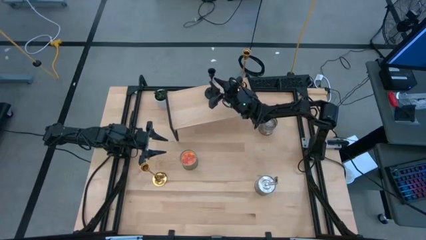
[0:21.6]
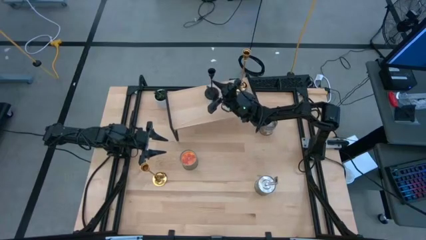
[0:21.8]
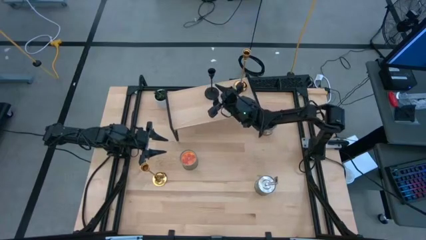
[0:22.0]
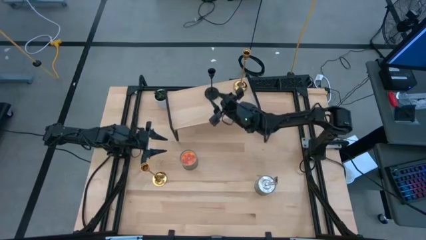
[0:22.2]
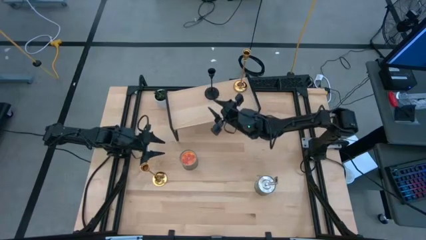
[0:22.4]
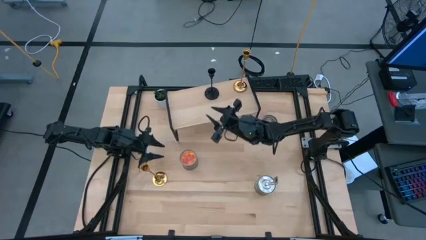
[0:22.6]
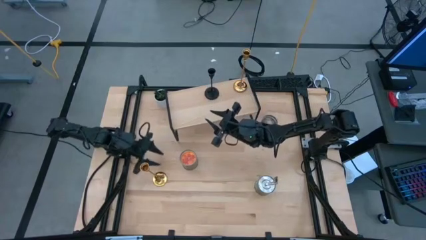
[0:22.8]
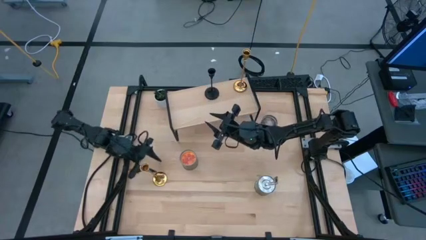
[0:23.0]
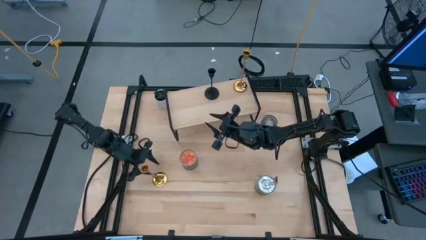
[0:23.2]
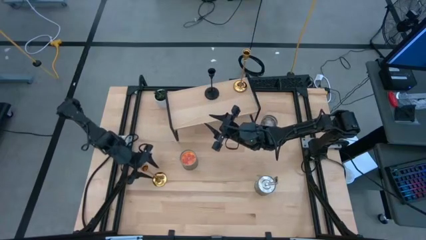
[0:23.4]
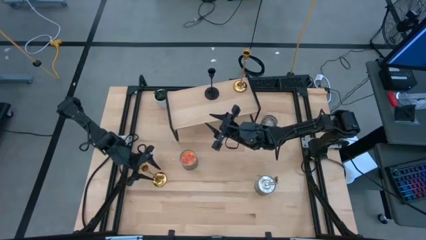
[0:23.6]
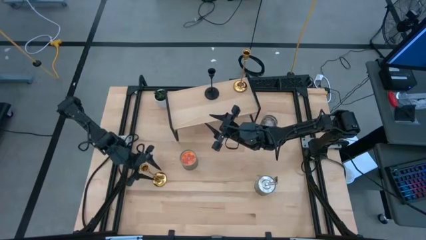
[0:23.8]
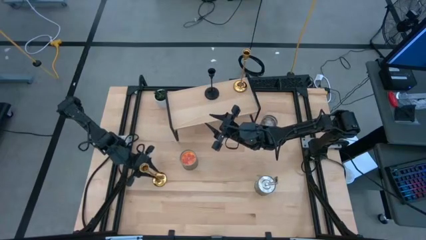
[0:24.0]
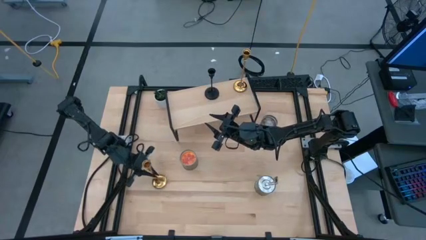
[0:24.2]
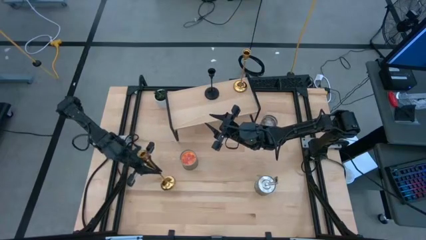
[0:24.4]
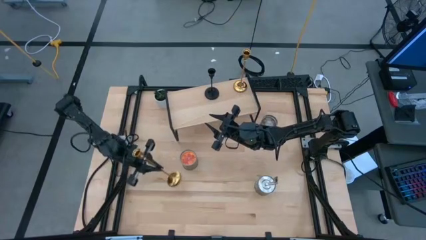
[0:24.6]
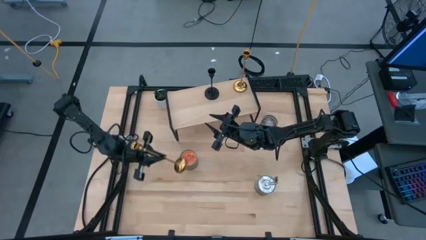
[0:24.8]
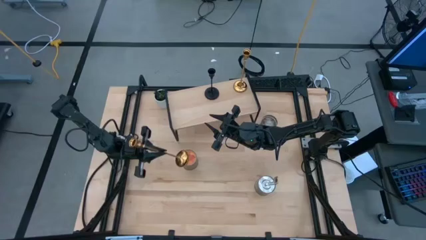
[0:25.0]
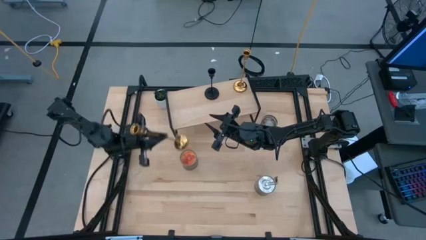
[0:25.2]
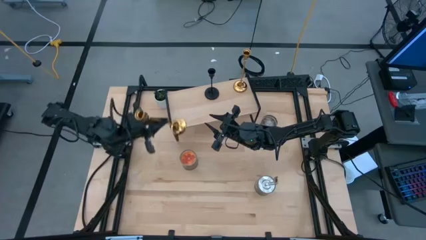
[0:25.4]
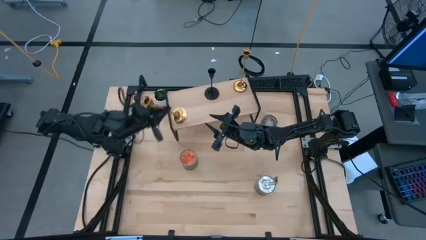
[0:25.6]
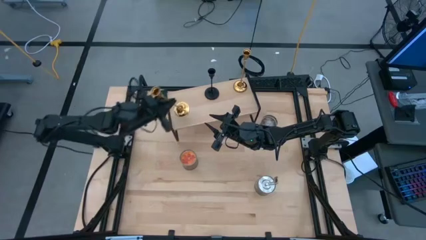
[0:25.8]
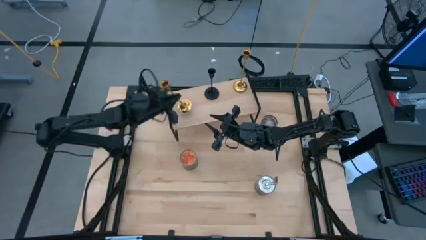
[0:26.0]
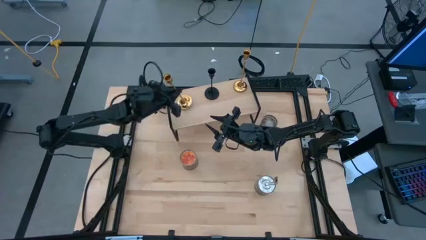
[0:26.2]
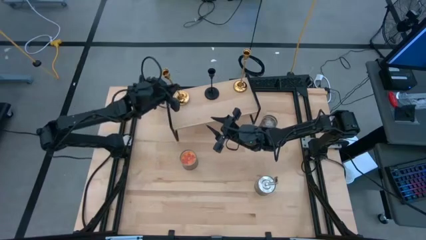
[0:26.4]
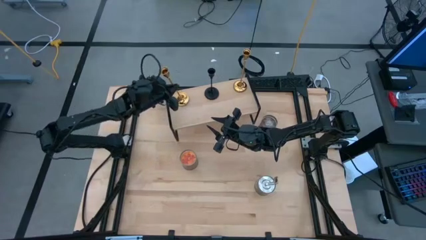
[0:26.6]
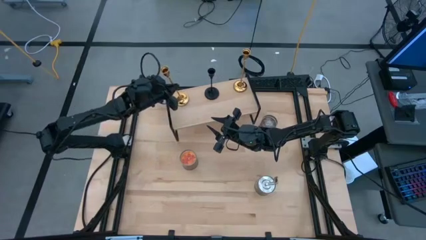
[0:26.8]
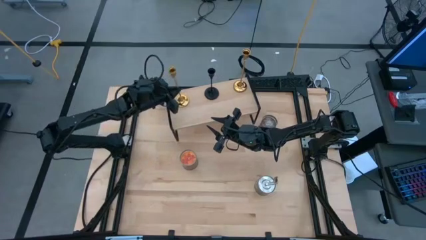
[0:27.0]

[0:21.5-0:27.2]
Task: Pick & Place candle stick holders
Put the gold candle holder on the shelf

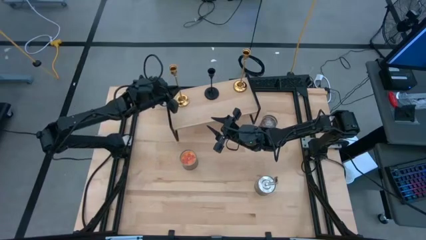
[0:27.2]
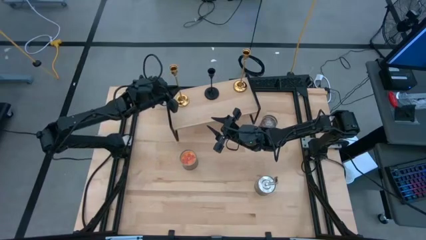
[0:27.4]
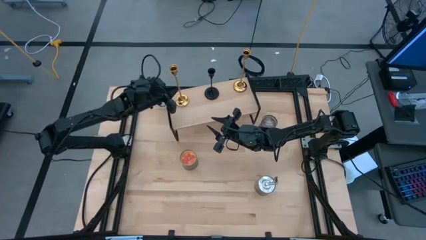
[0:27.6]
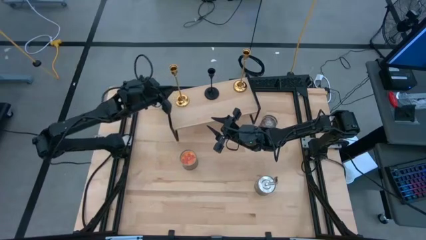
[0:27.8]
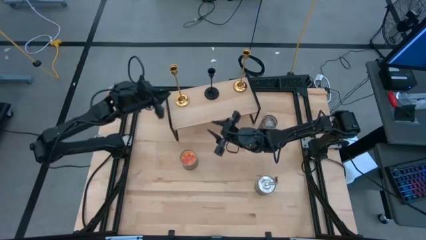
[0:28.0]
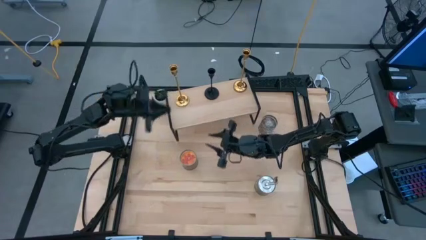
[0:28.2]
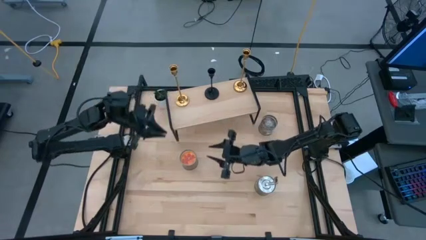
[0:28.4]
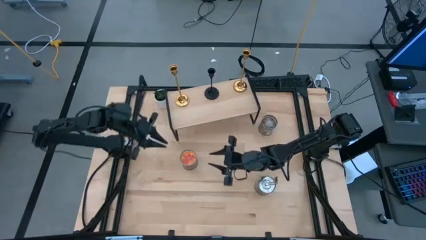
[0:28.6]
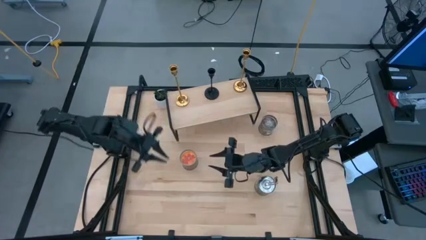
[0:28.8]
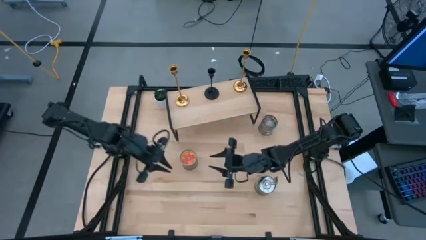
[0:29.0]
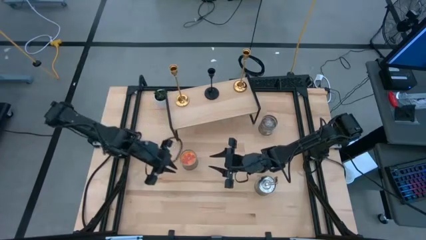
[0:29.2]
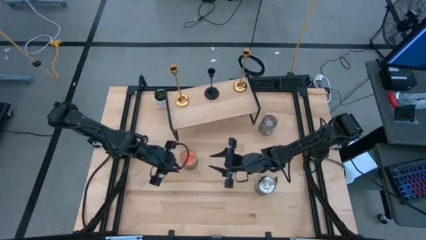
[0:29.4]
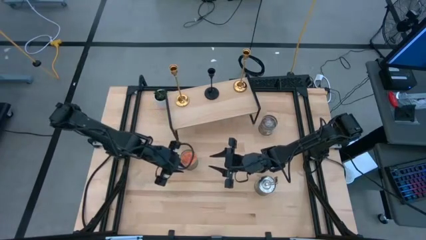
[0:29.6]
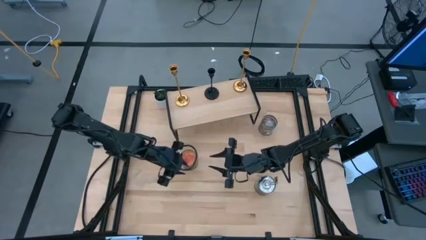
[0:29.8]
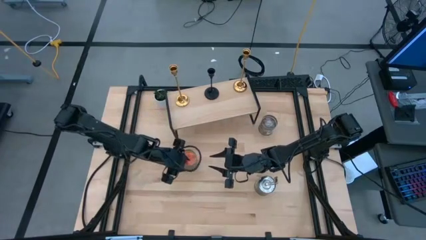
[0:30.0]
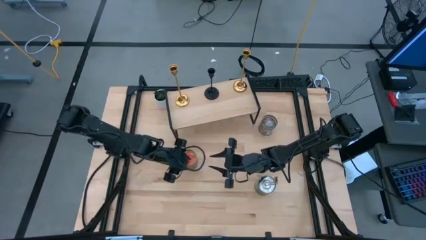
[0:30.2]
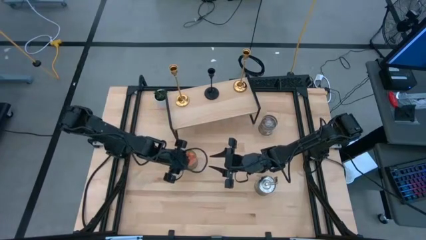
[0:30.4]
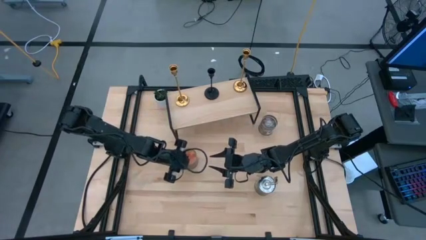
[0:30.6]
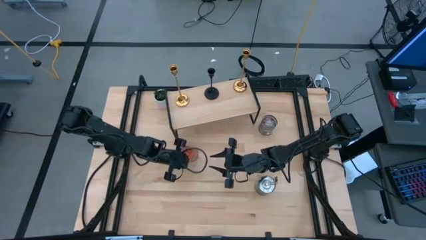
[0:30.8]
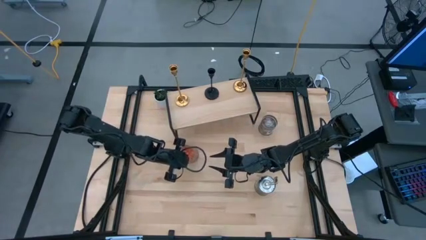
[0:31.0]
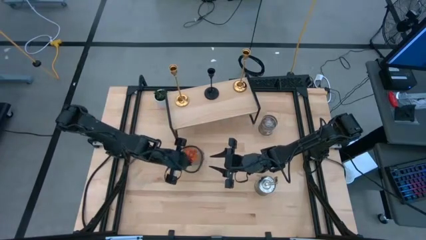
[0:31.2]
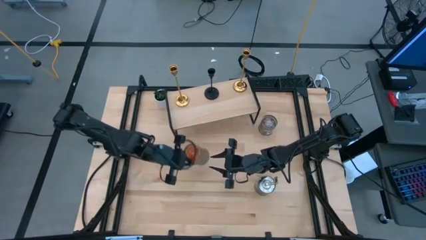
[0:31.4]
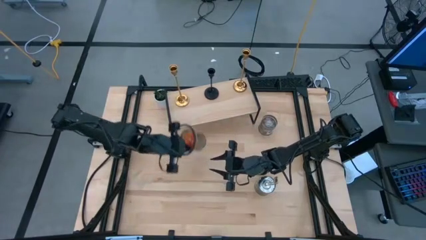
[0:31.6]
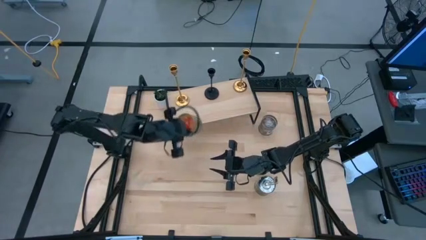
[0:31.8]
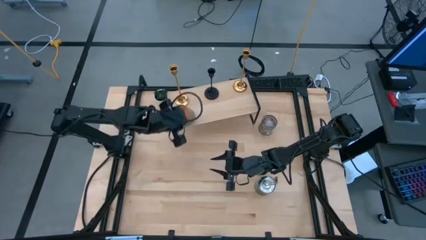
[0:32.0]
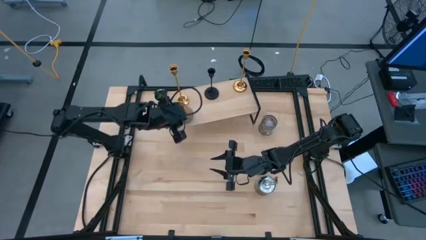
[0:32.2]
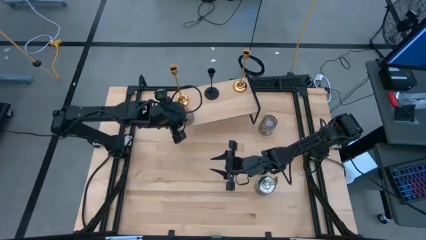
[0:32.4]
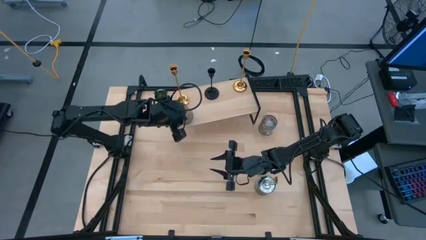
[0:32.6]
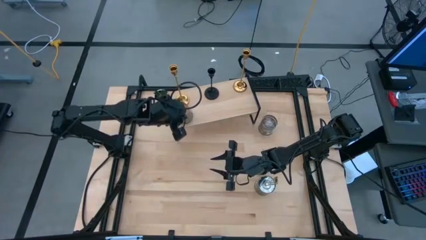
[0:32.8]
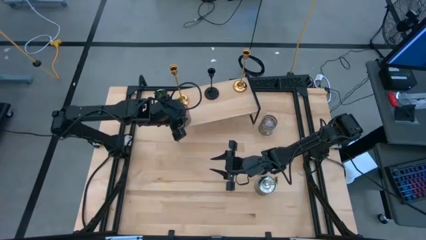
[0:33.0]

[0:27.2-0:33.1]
Put the orange scented candle on the shelf

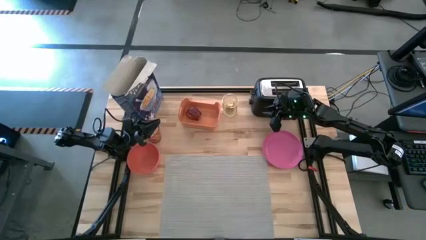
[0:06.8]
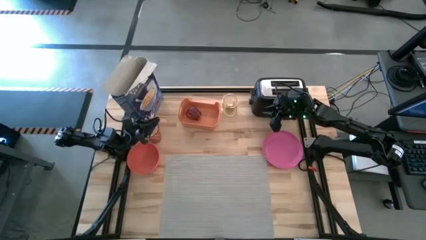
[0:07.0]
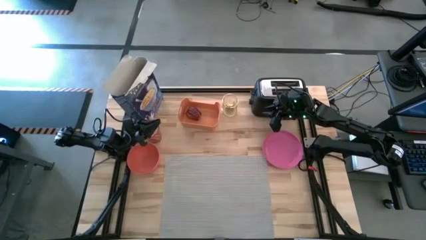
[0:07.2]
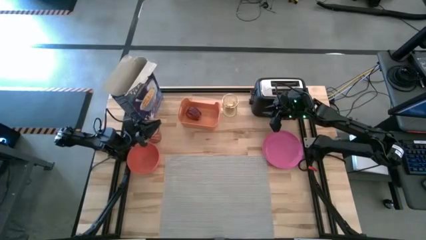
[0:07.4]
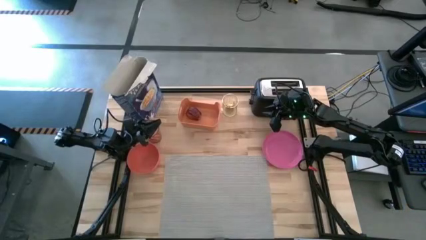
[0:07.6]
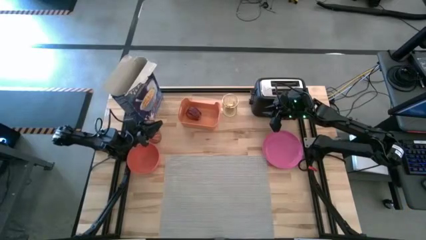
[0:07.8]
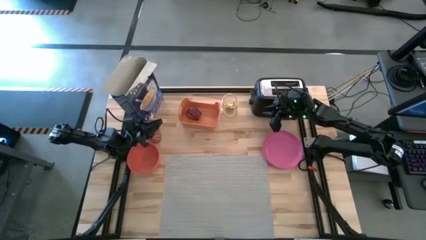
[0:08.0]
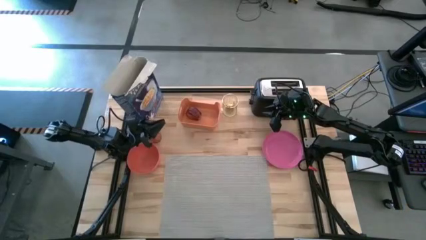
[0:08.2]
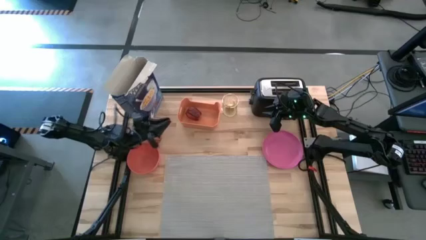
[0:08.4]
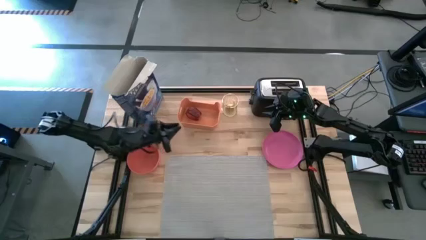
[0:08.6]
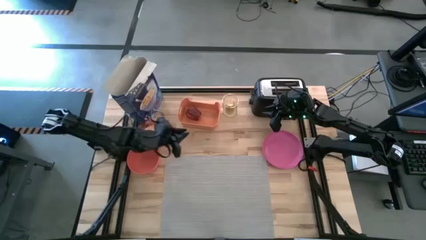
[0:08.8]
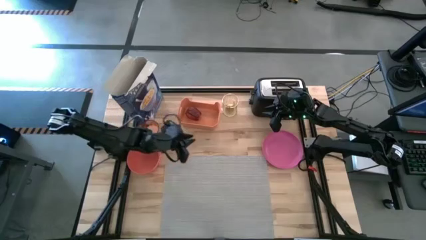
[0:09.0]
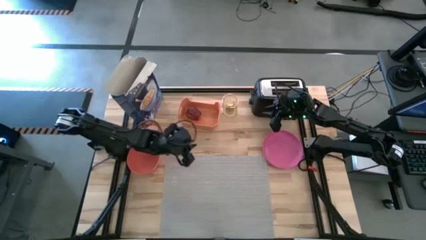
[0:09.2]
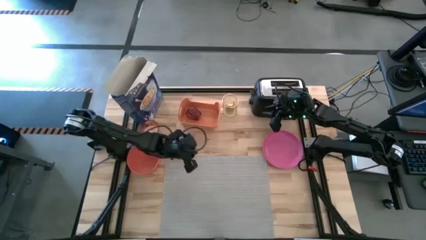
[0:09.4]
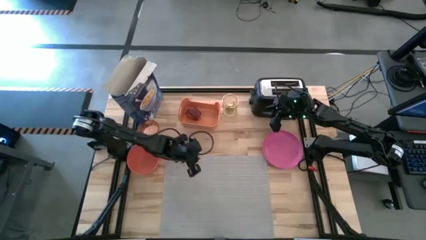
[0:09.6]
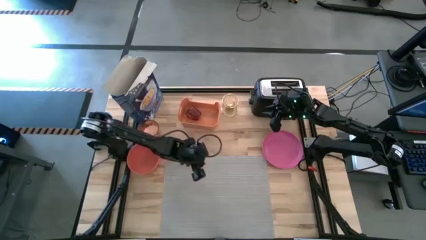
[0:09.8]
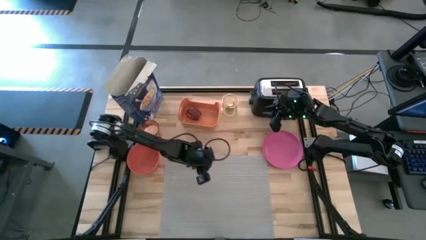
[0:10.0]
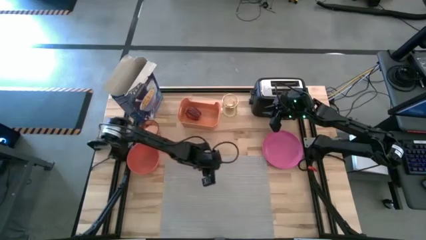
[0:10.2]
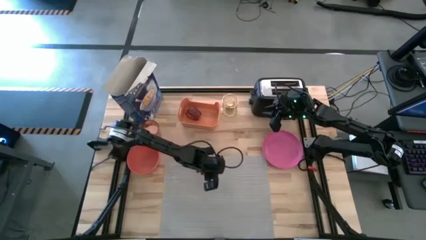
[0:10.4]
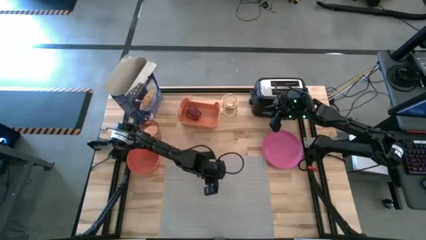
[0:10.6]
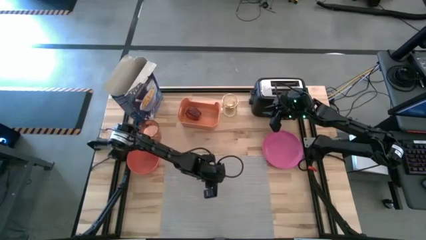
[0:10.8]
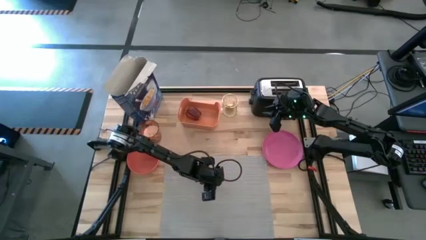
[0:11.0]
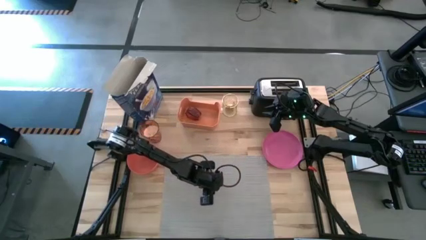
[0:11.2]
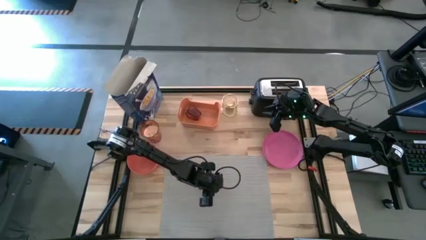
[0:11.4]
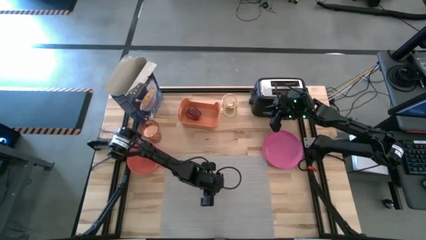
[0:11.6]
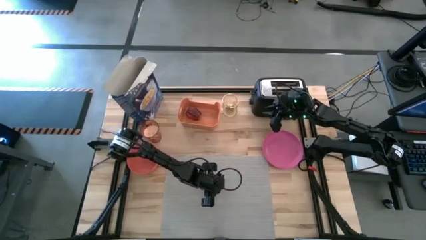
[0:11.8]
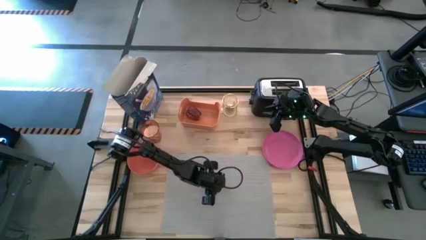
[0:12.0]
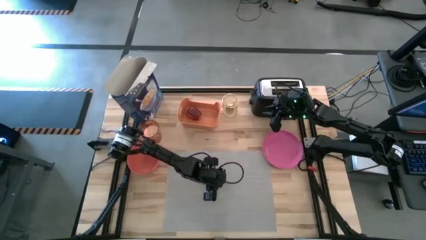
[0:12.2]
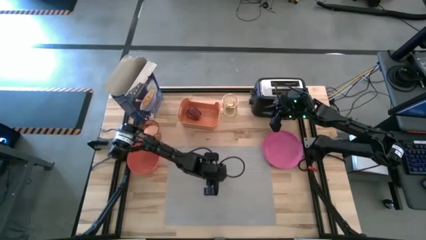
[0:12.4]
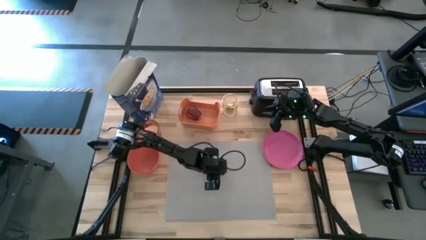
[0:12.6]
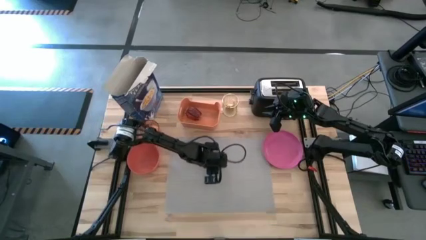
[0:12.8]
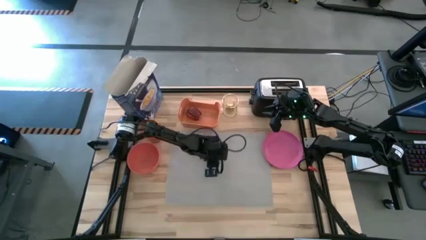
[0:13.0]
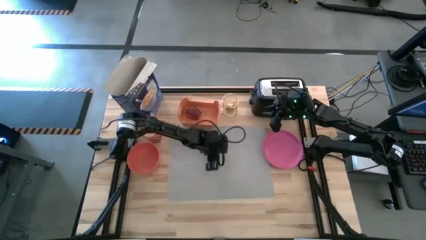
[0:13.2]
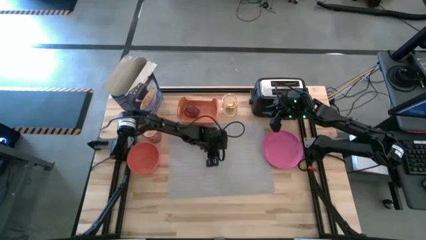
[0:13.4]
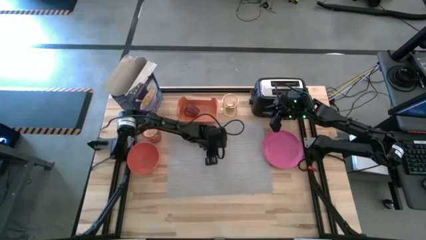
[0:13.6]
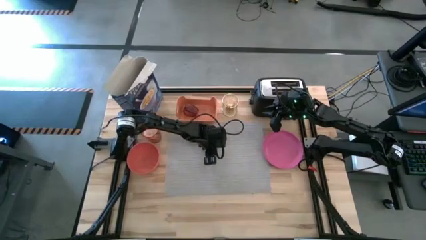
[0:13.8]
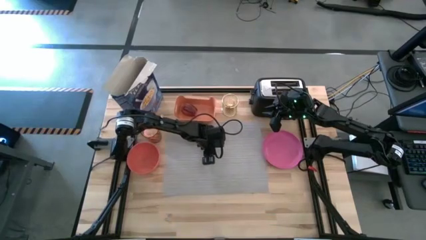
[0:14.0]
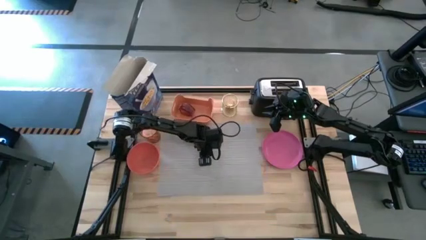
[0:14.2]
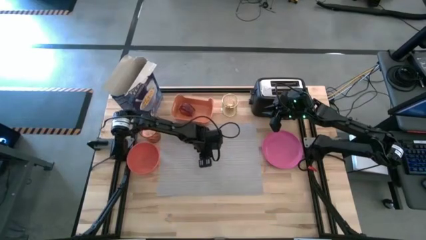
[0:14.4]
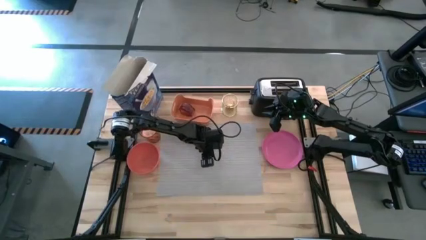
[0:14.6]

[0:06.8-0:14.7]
Task: Arrange a breakfast setting
Move the gray tablemat to the center of the table
